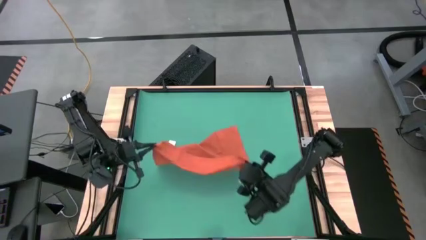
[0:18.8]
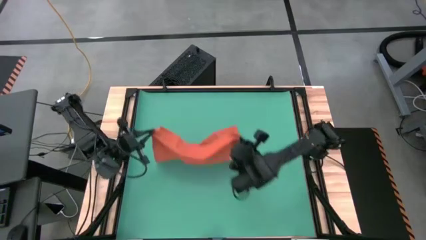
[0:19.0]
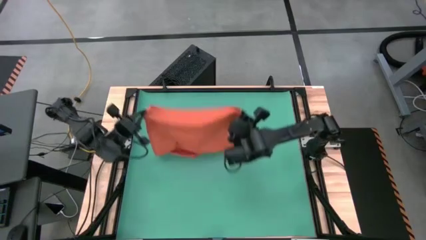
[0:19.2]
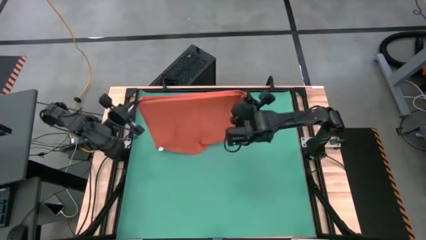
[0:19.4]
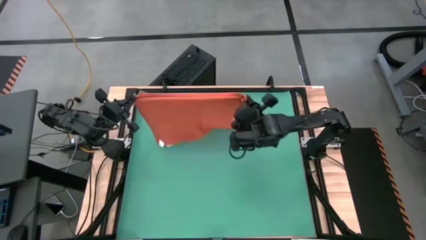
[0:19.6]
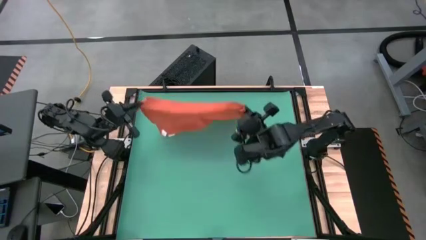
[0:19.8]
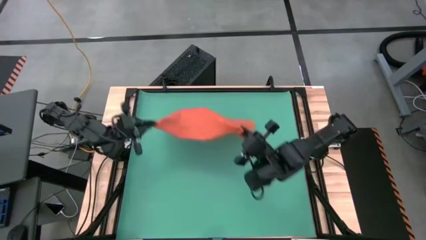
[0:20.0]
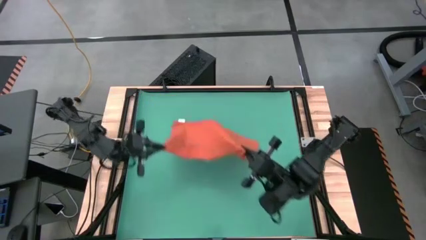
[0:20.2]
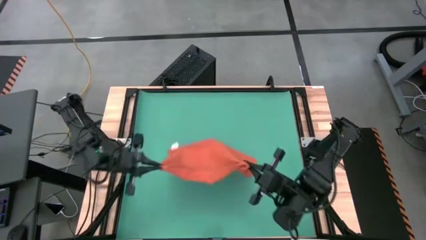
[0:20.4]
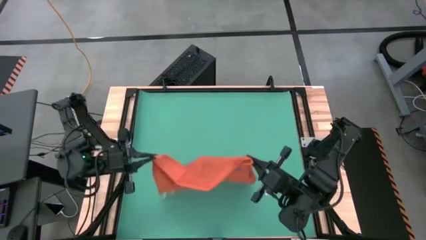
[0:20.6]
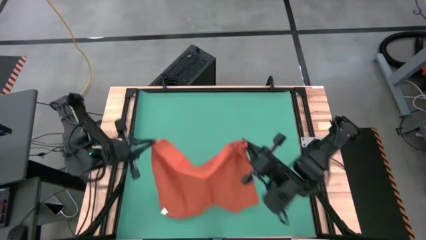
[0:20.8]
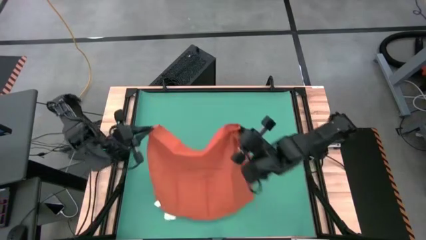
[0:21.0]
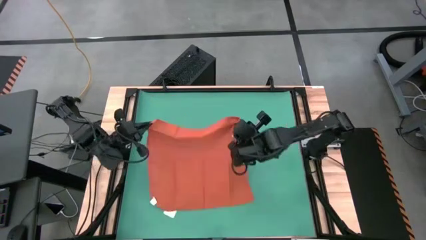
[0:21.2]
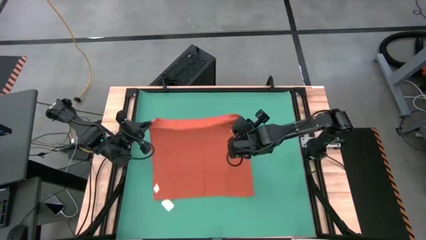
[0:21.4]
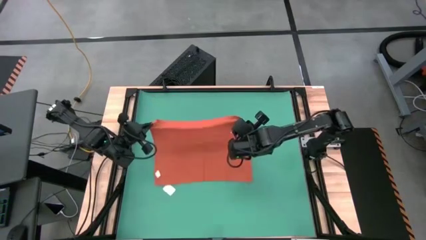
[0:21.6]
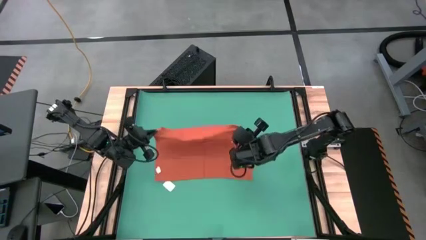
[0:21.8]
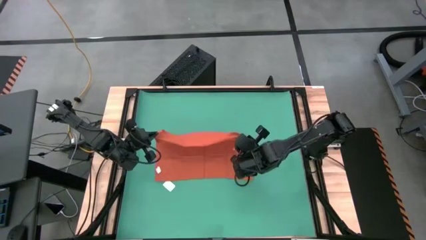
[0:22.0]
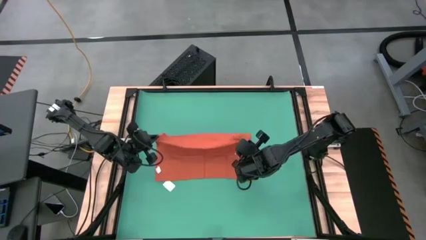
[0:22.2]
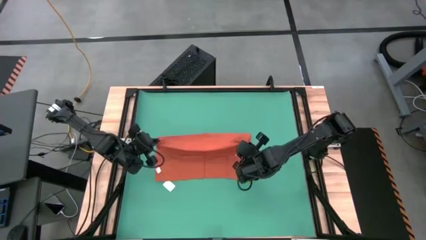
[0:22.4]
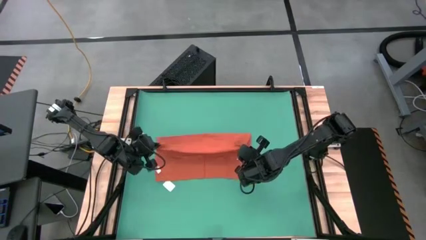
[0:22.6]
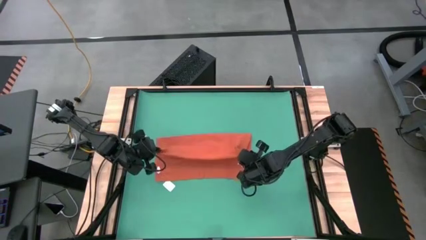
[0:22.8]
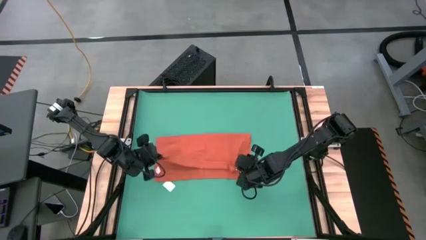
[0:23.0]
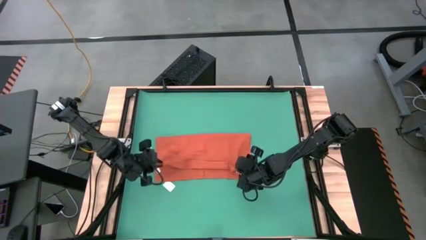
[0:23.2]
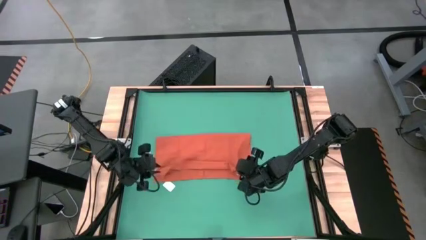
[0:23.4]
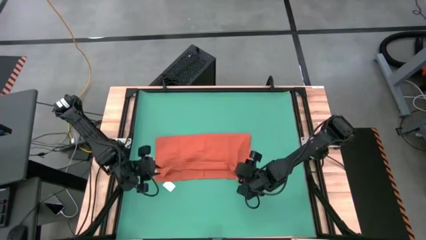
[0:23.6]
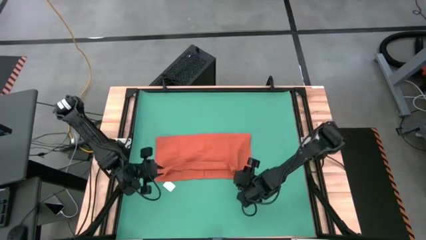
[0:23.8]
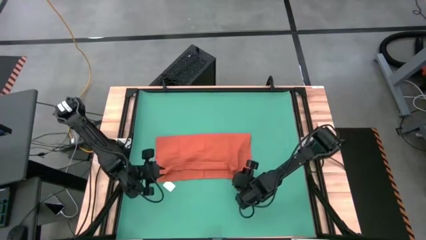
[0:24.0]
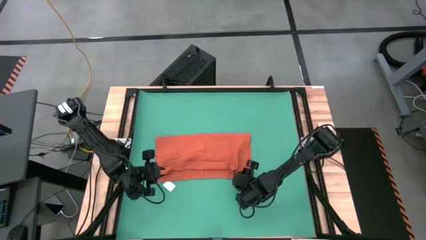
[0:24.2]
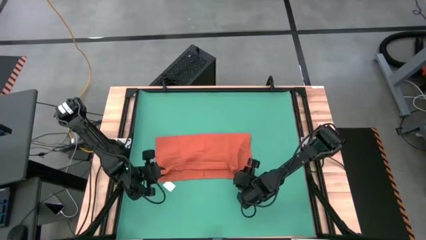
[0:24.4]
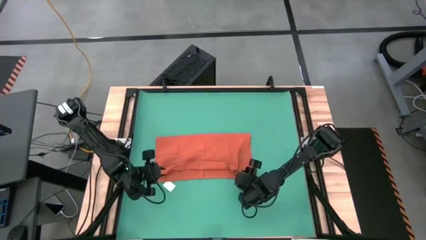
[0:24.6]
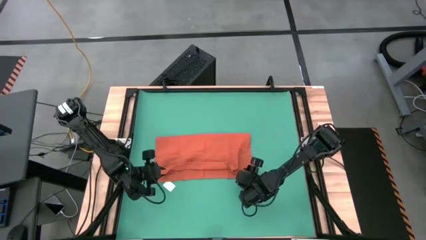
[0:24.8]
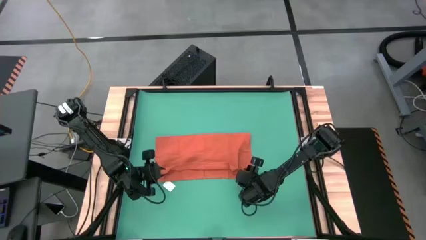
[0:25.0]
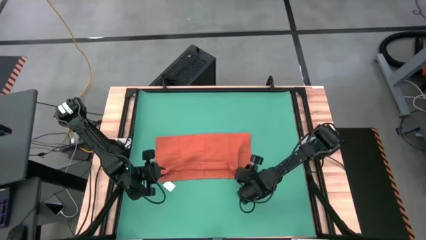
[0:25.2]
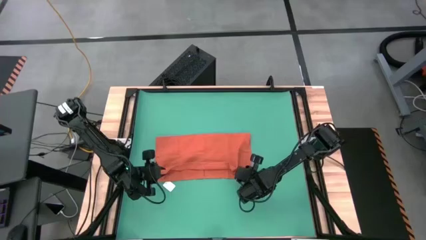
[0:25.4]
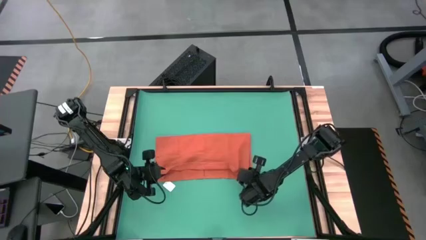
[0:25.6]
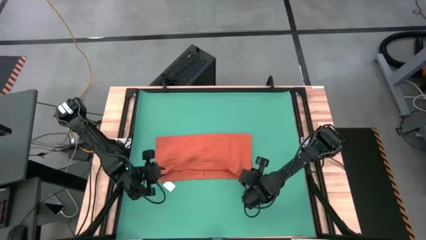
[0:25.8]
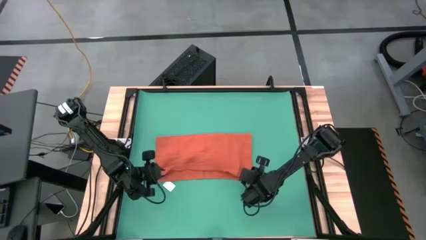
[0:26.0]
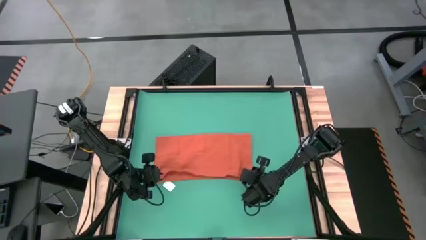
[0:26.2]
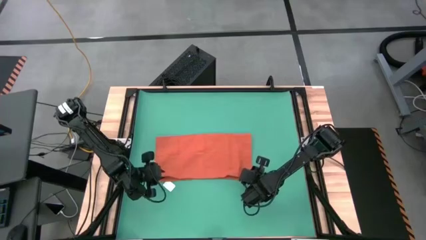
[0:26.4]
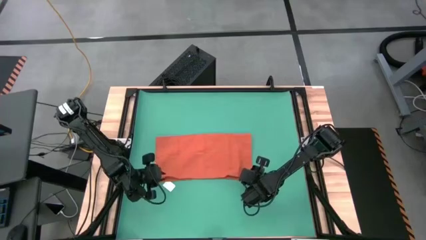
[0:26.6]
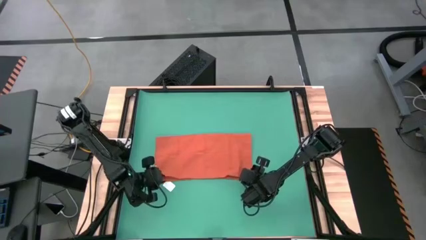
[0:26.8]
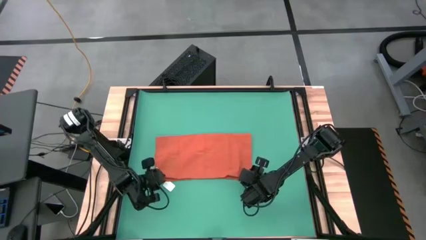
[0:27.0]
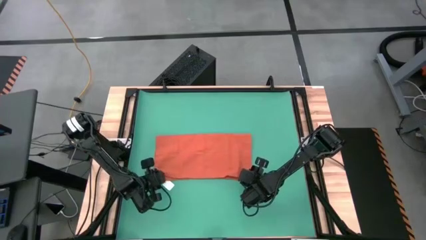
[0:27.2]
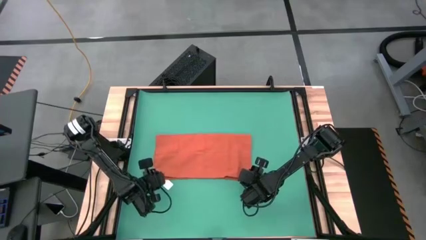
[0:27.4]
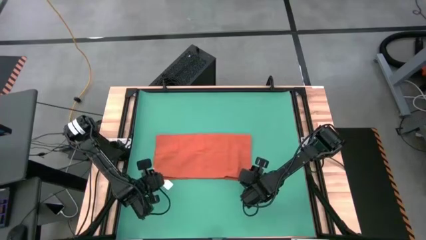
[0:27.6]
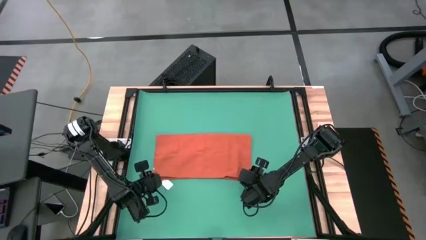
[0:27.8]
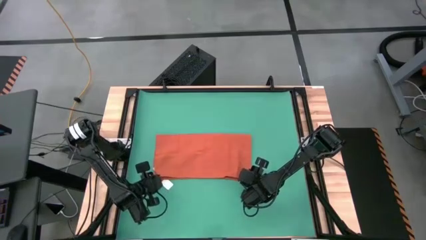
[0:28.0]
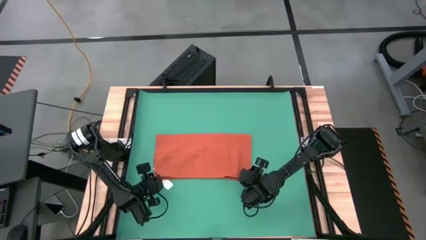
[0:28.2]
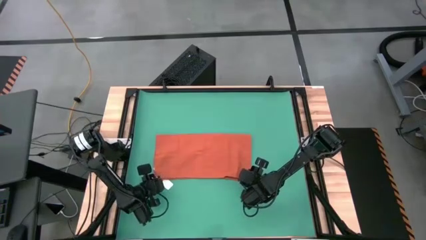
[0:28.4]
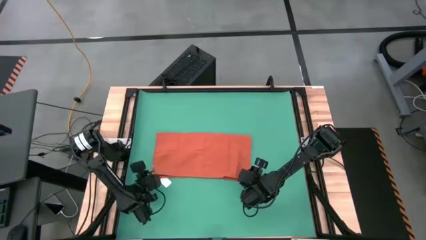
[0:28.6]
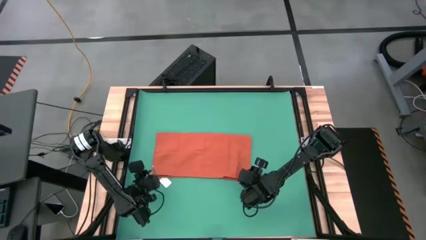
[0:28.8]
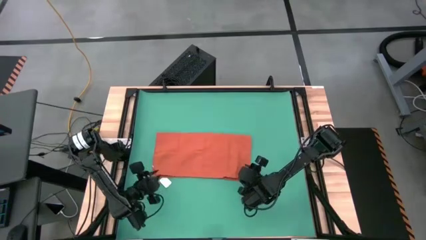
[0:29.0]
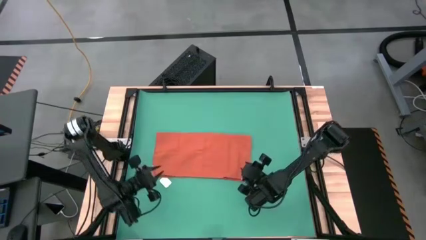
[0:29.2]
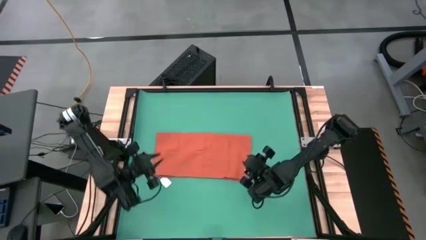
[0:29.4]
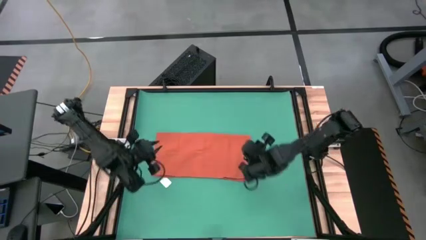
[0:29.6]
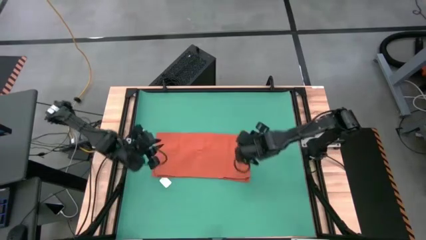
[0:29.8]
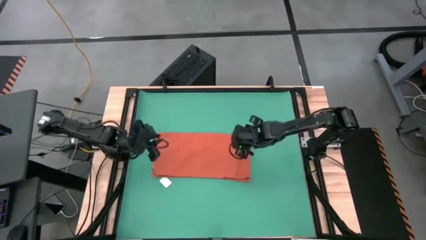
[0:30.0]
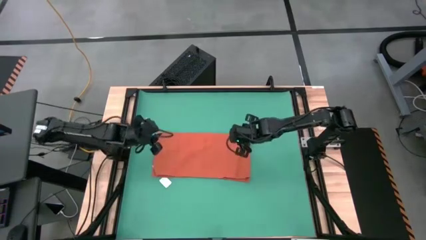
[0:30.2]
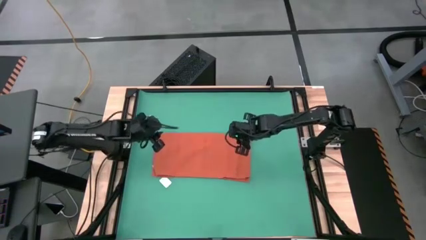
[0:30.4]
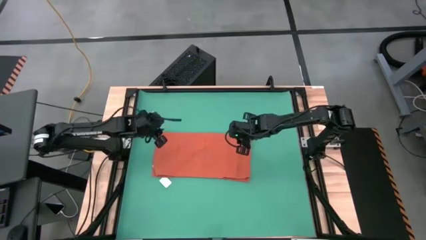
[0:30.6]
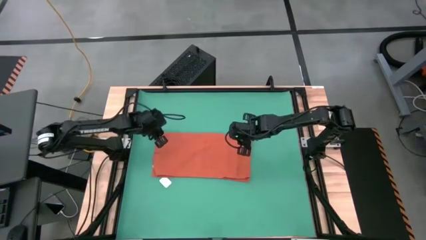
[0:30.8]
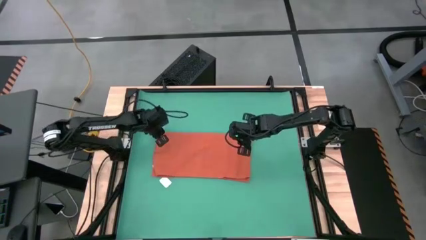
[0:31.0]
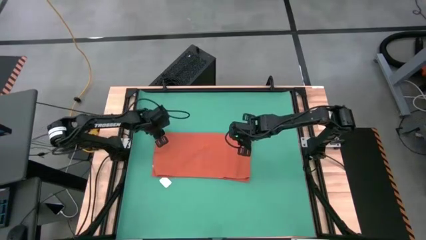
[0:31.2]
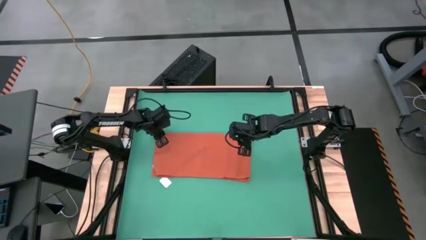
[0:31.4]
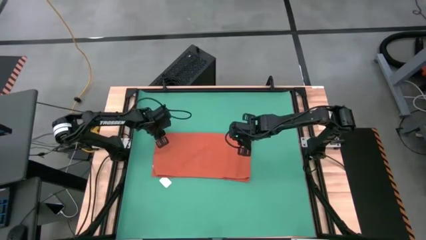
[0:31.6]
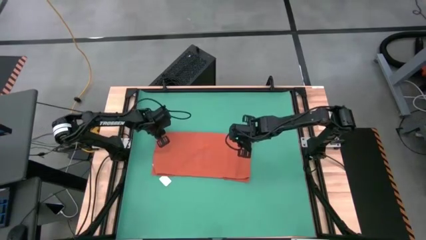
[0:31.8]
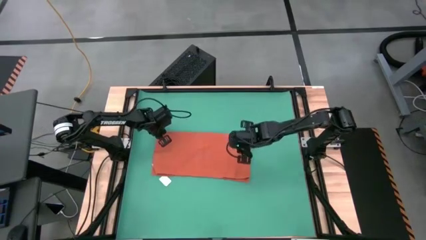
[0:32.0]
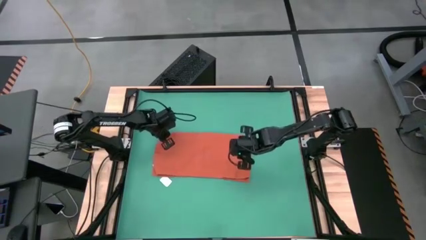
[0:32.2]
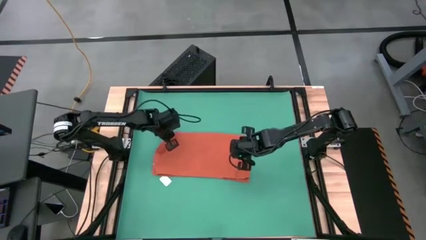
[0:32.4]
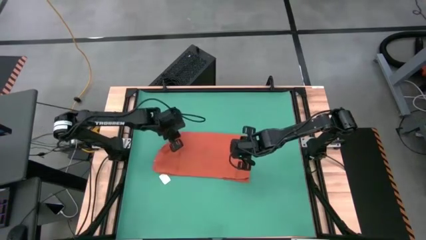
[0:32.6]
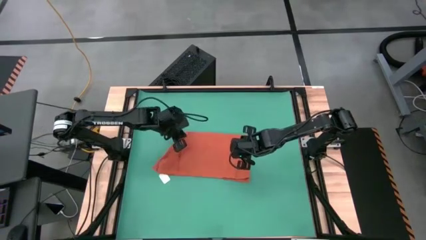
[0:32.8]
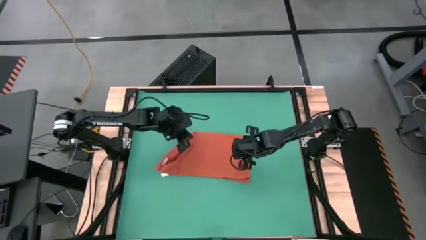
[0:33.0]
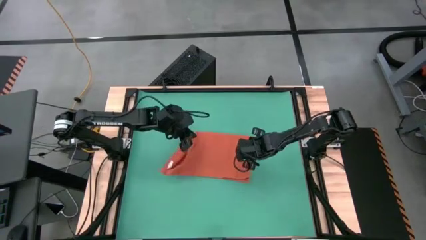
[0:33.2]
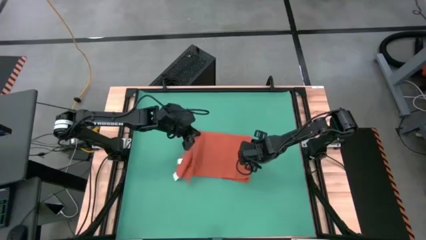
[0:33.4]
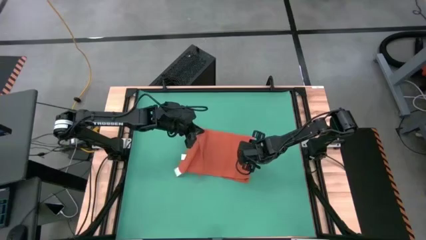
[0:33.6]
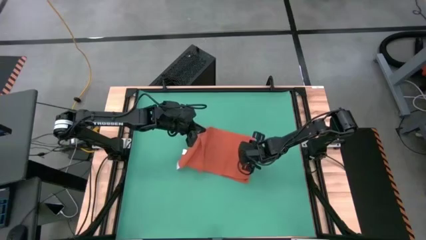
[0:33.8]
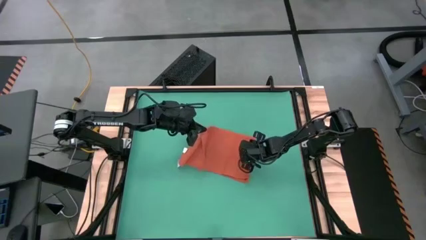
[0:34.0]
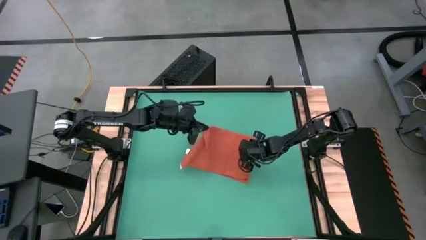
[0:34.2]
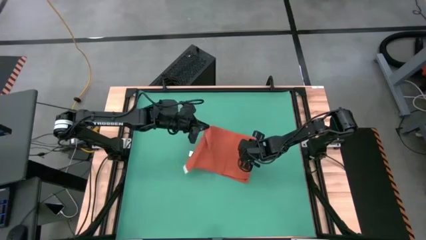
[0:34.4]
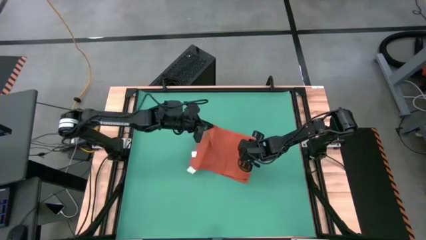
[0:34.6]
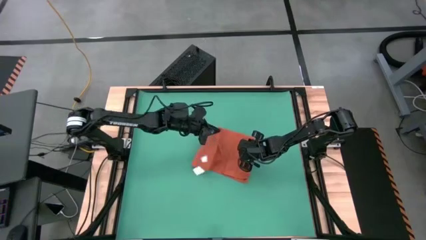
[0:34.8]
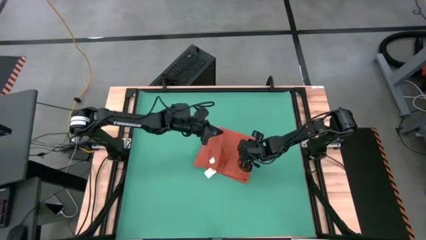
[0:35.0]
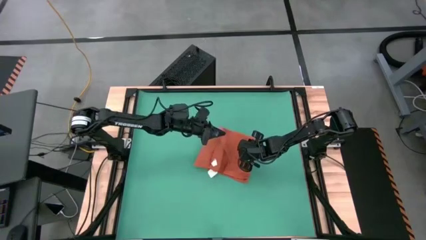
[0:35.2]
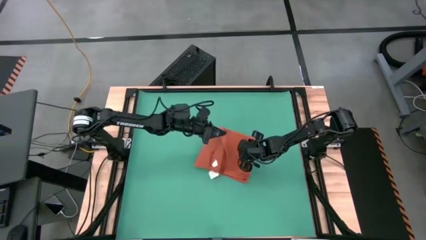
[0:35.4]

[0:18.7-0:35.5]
Task: Roll napkin
Fold the orange table napkin
